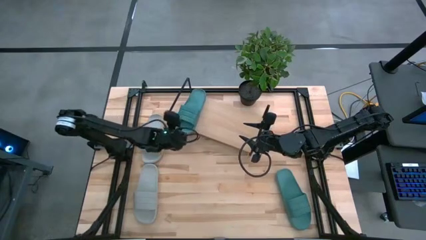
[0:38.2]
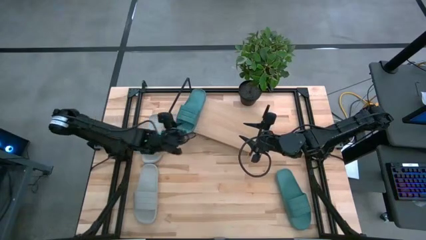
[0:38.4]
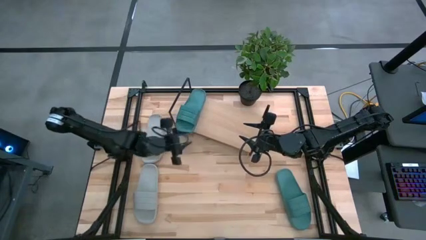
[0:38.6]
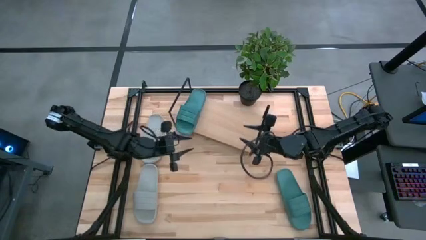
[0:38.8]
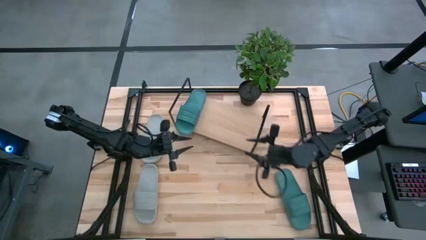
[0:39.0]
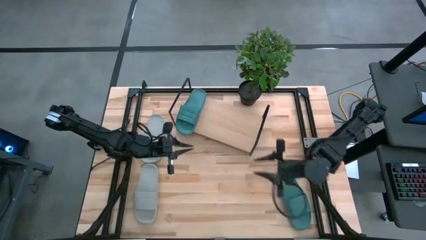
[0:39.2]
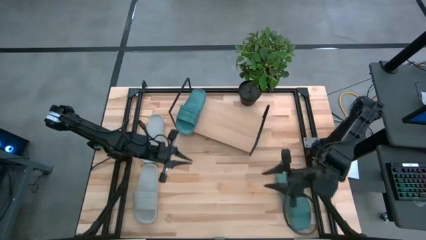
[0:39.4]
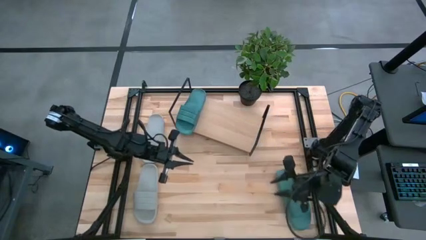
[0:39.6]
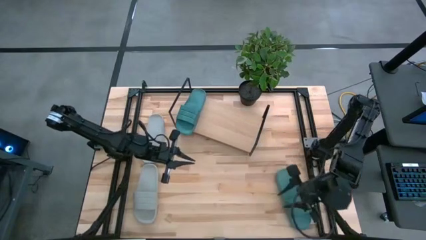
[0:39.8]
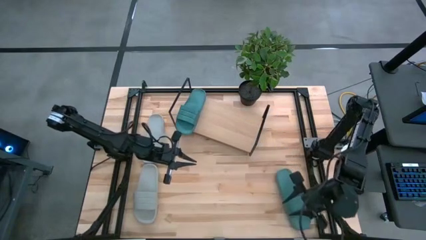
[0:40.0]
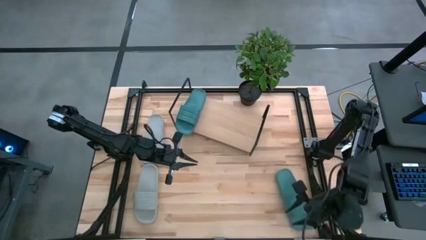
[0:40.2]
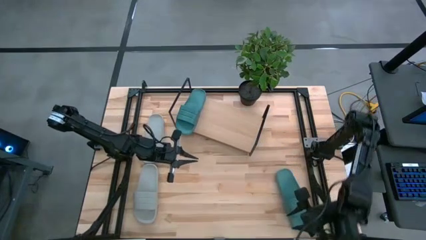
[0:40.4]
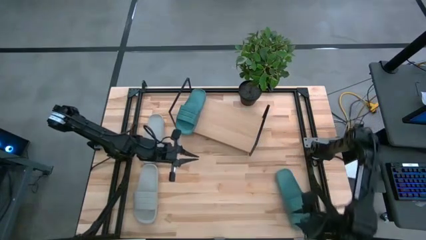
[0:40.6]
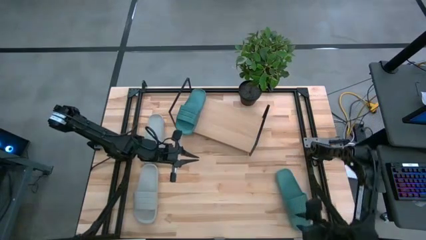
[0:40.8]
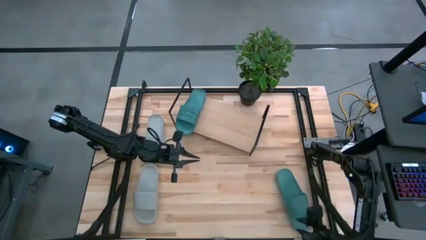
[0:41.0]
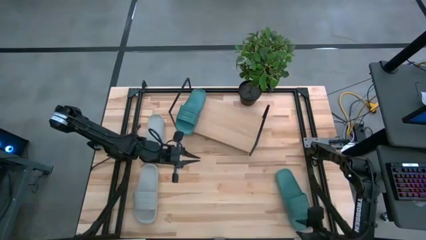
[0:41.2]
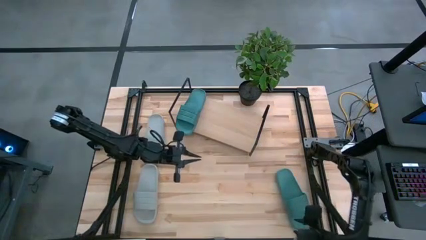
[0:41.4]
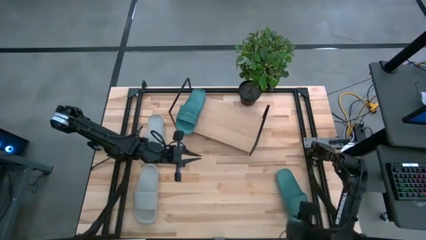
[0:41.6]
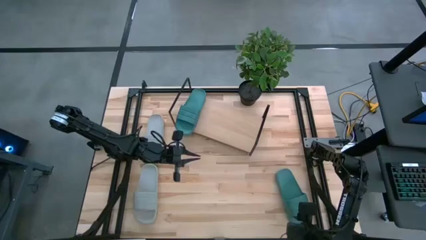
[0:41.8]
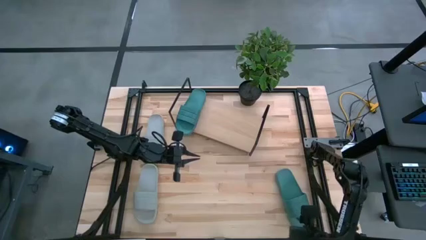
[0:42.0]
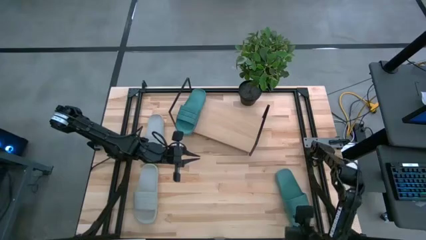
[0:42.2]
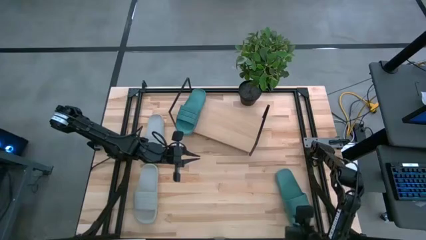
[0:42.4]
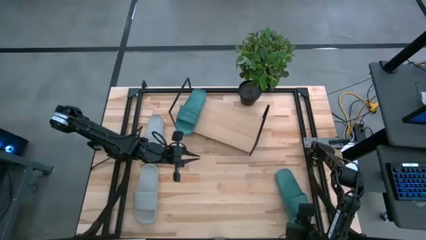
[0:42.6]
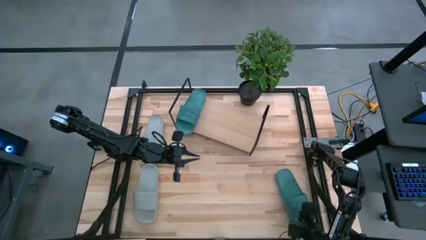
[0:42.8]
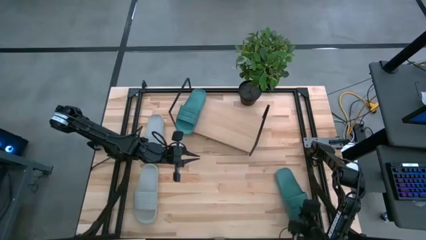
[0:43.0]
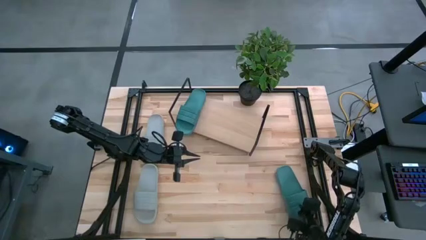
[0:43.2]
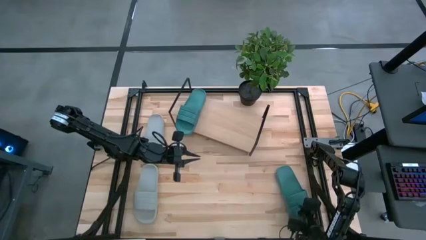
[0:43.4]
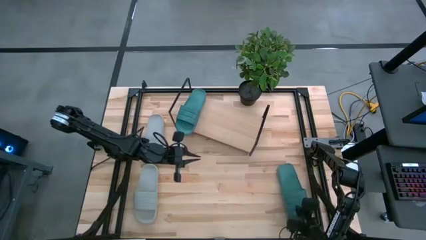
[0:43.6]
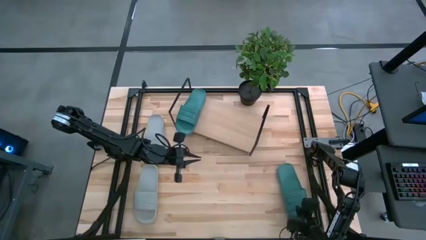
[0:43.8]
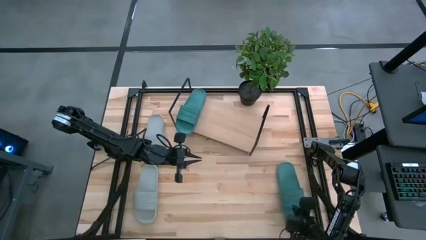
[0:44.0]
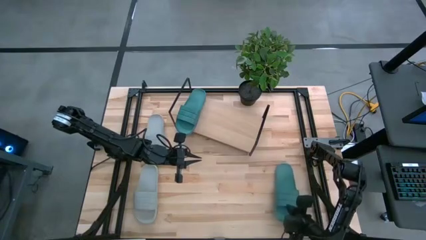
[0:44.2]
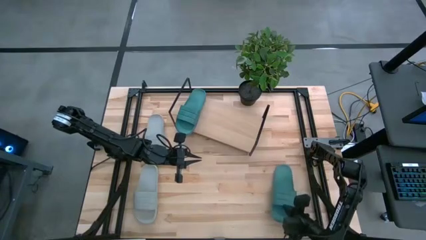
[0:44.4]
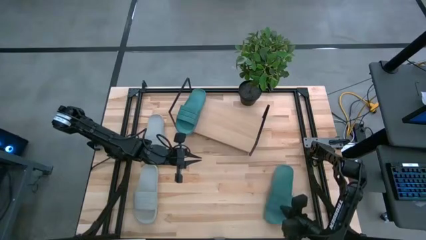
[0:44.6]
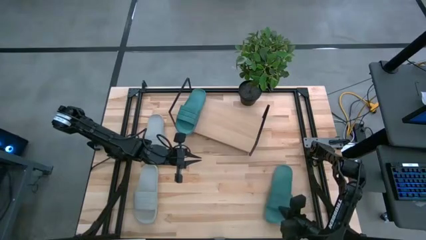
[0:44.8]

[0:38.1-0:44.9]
Task: Pick and place slides into the shelf
Put the green slipper on the shelf
